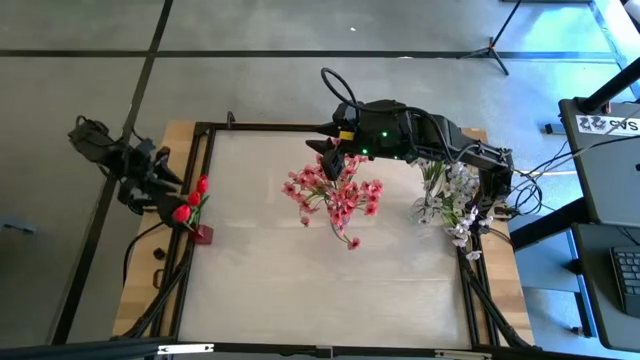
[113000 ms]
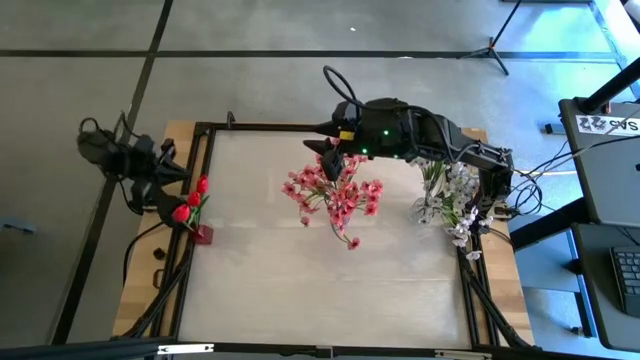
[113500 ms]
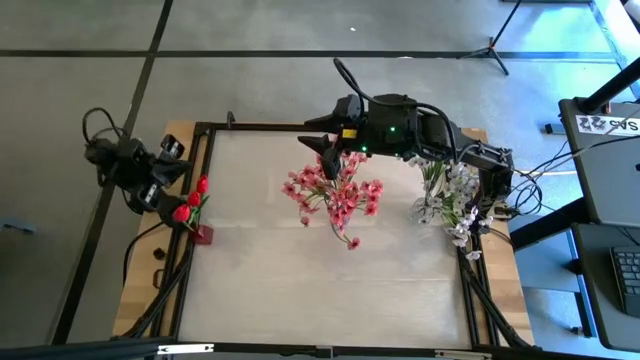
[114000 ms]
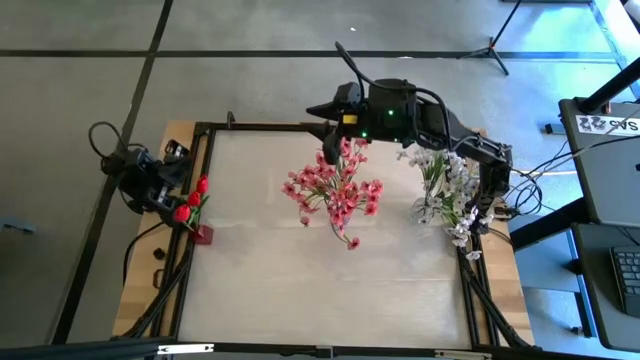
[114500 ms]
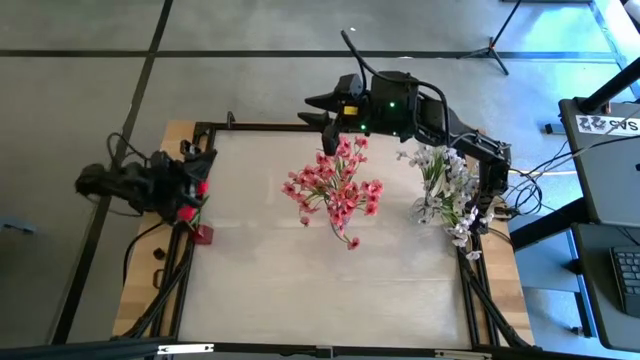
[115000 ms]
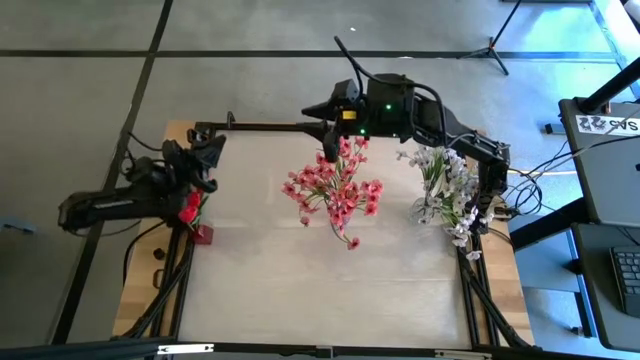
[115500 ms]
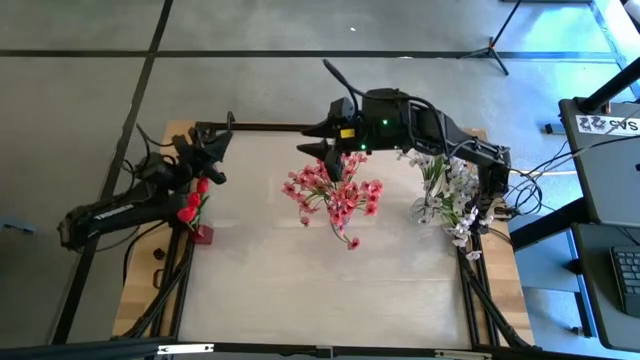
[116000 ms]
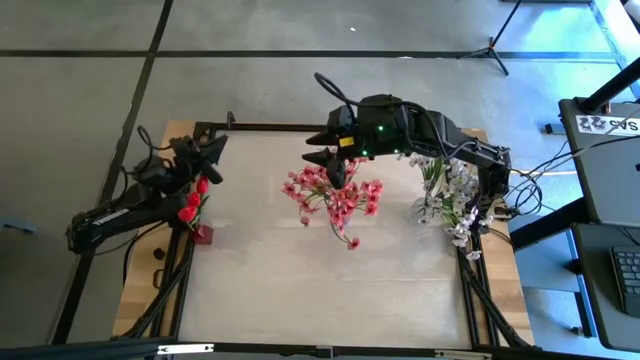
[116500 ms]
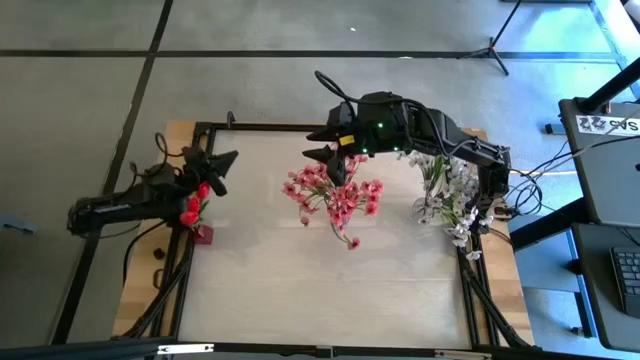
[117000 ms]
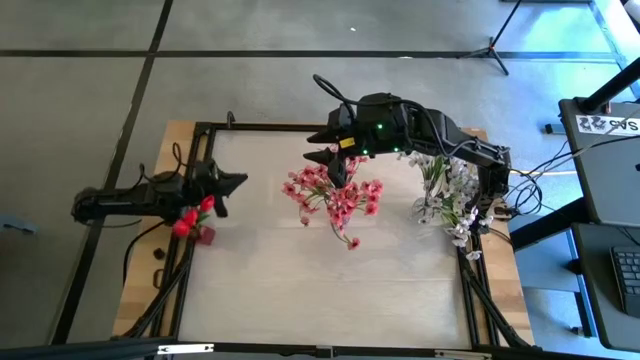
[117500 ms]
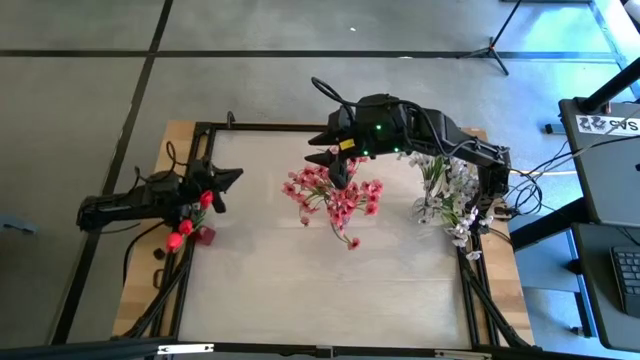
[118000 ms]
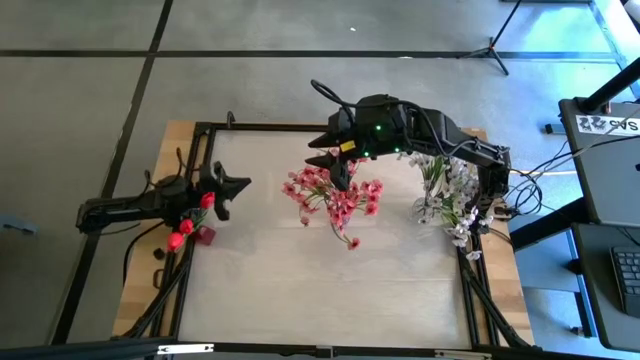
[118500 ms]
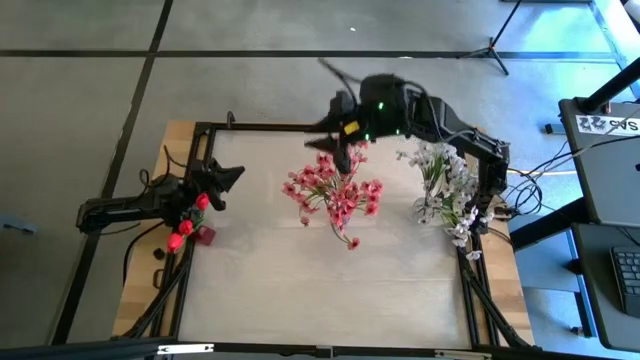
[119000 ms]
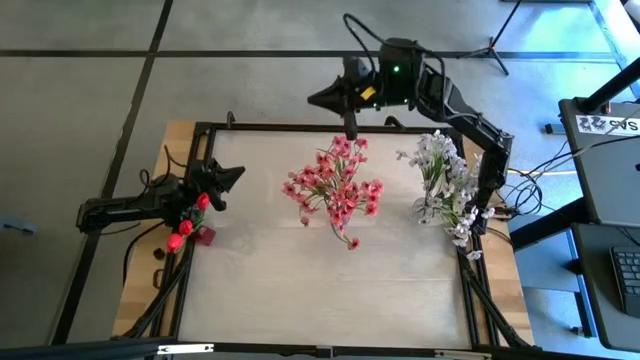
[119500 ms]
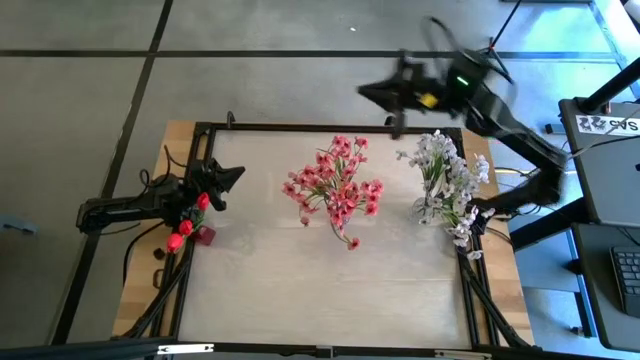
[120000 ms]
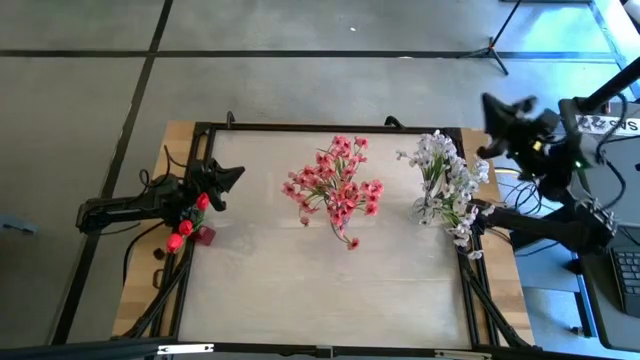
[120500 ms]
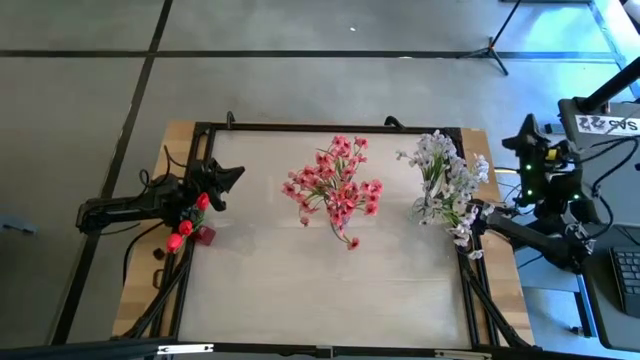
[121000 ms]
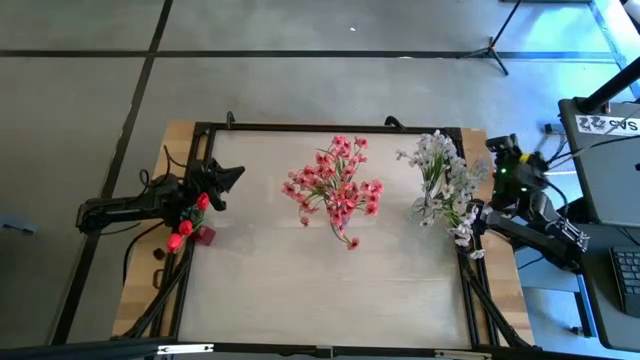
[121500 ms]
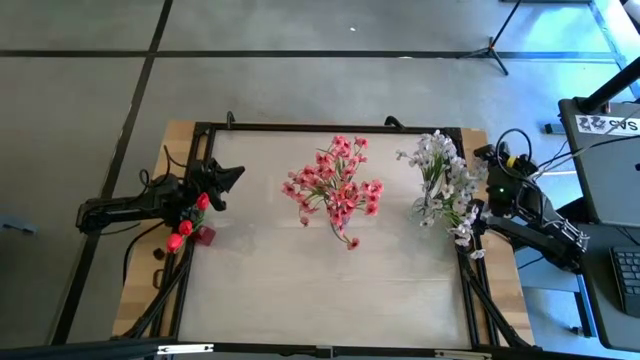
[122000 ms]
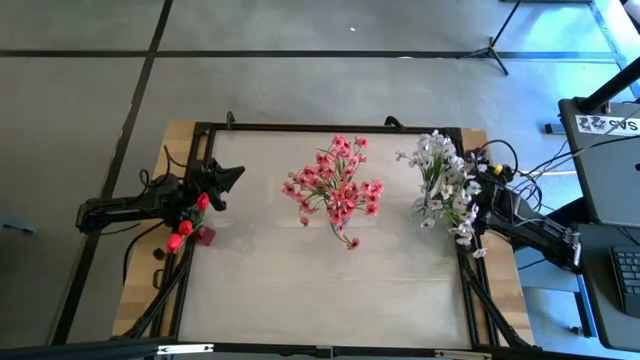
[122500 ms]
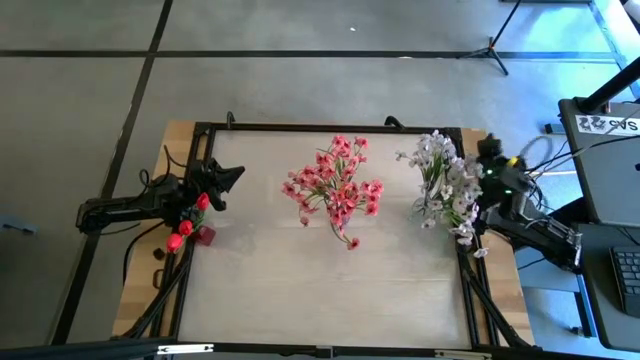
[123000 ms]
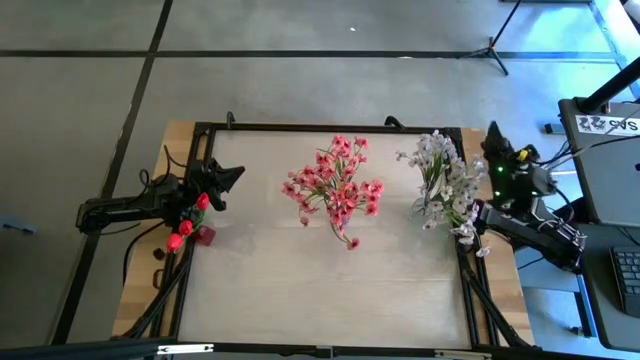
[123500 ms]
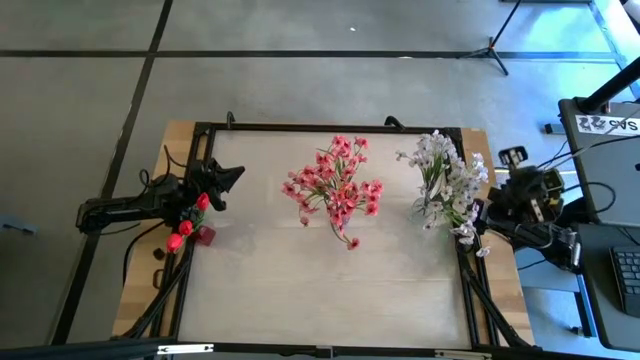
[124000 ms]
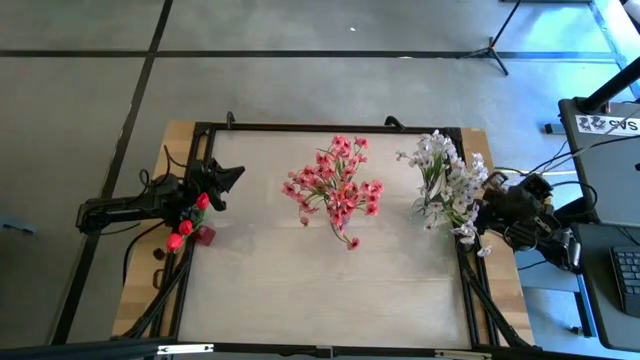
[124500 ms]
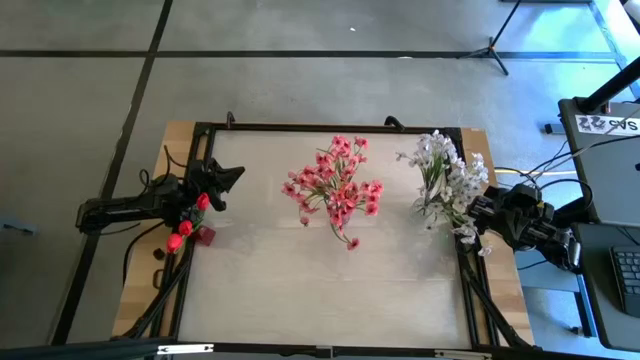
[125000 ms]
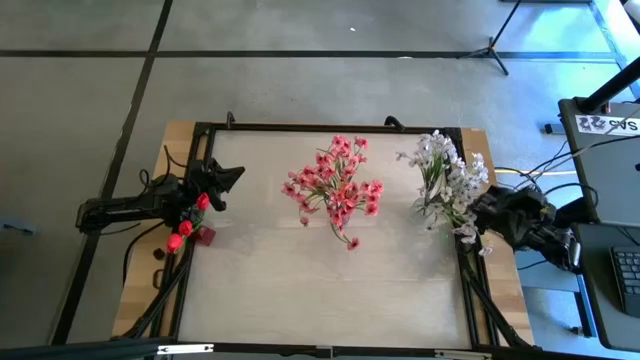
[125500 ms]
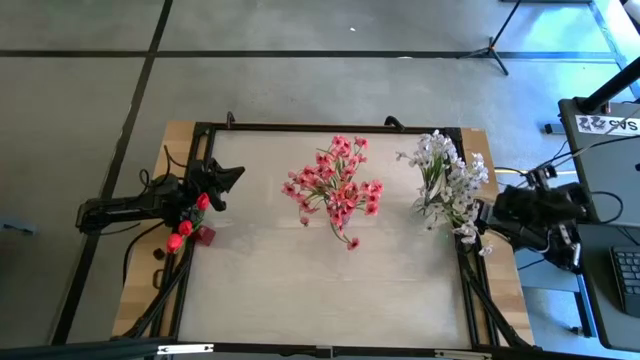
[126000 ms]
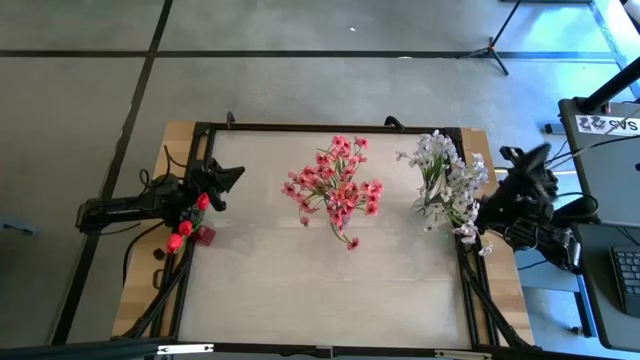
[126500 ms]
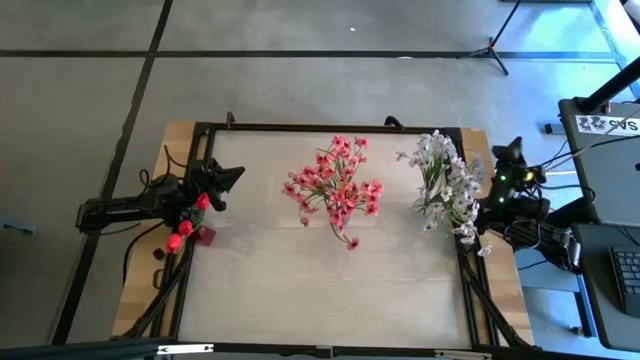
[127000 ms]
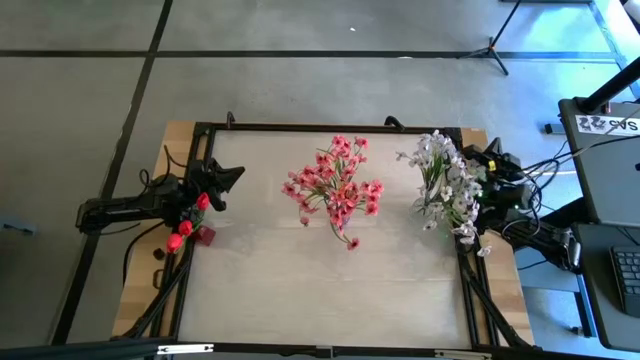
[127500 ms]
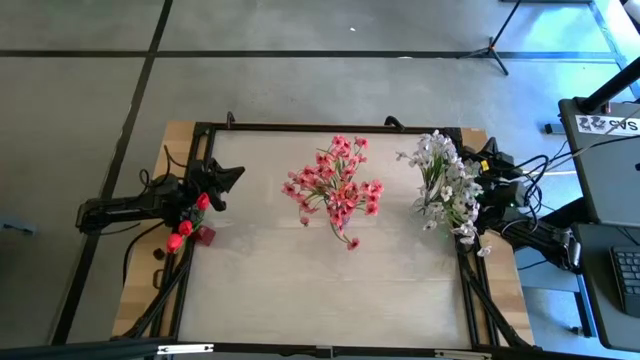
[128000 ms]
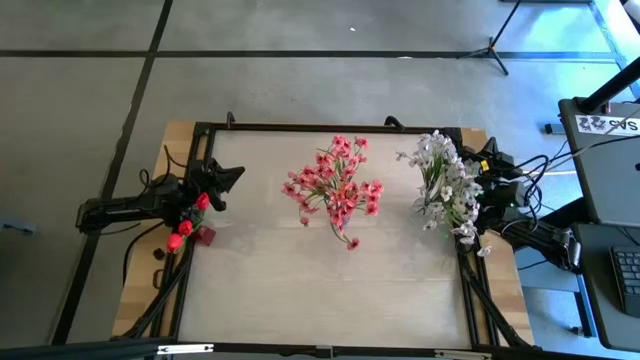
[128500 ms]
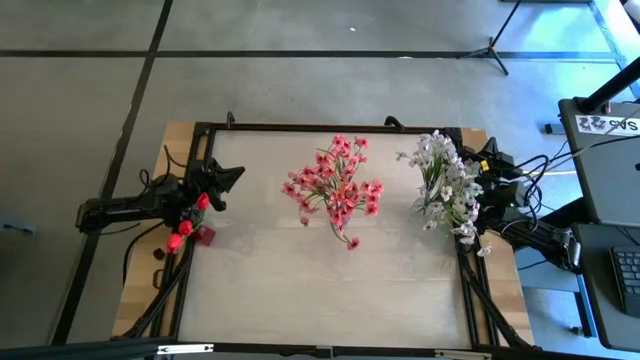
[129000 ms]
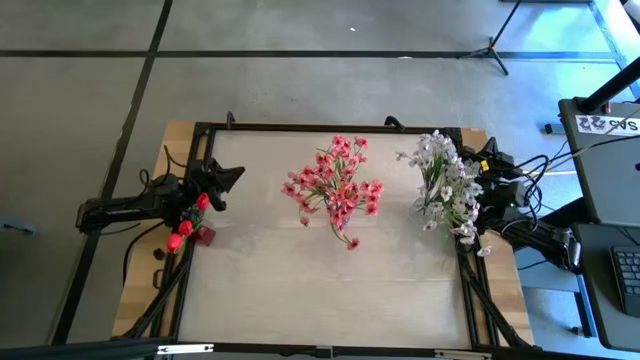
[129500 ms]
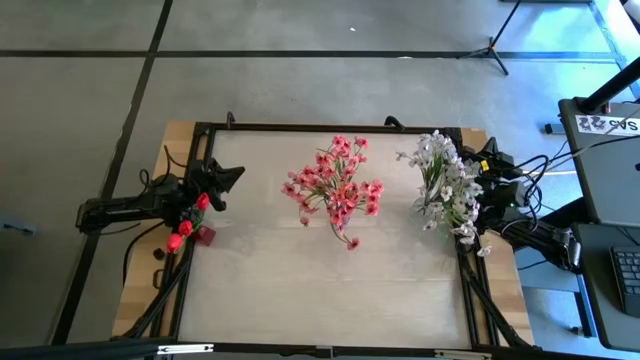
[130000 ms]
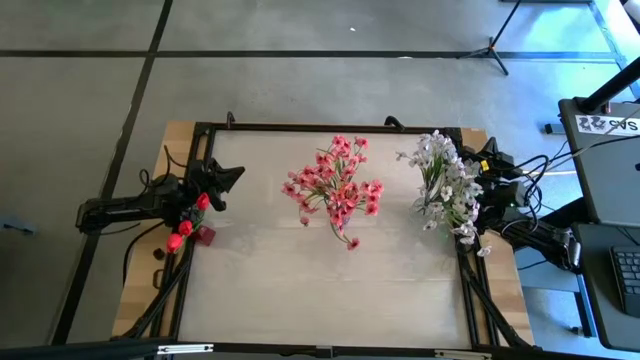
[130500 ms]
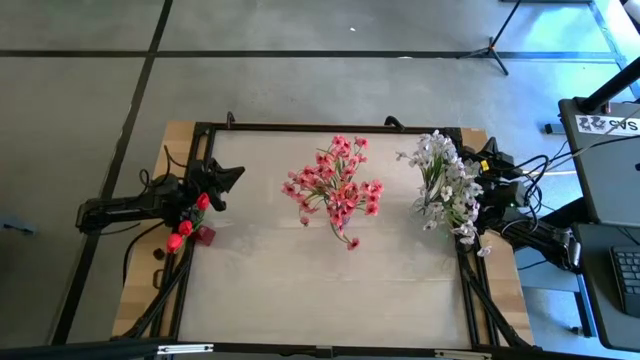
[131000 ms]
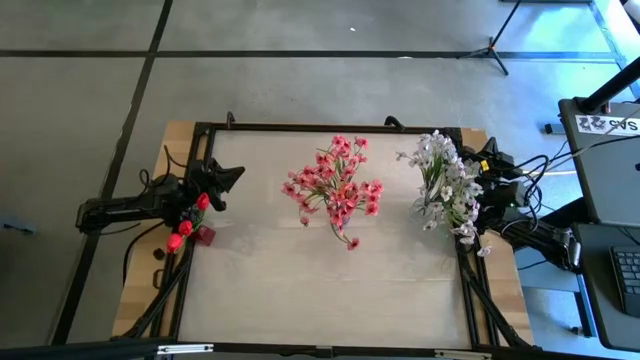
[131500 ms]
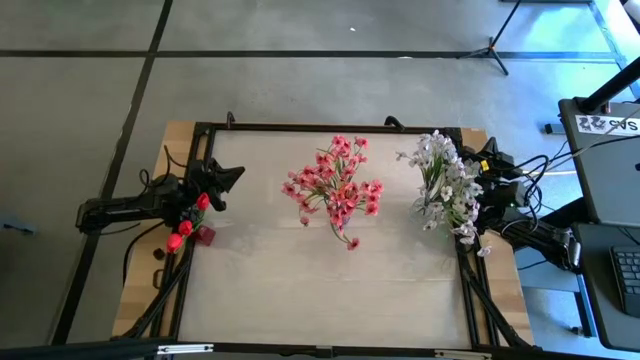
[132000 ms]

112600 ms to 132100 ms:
Task: Sort flowers into vase by color
Return to Home Position

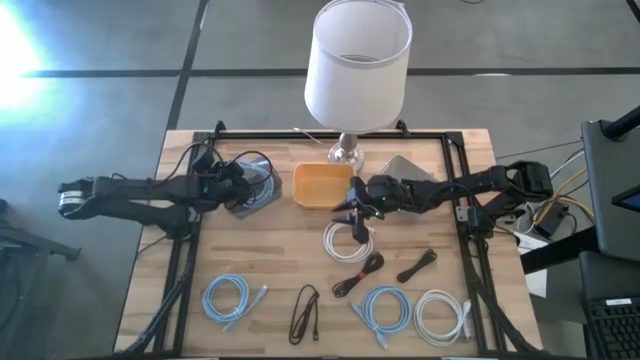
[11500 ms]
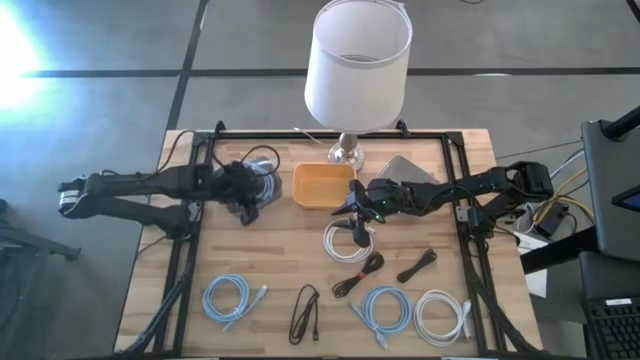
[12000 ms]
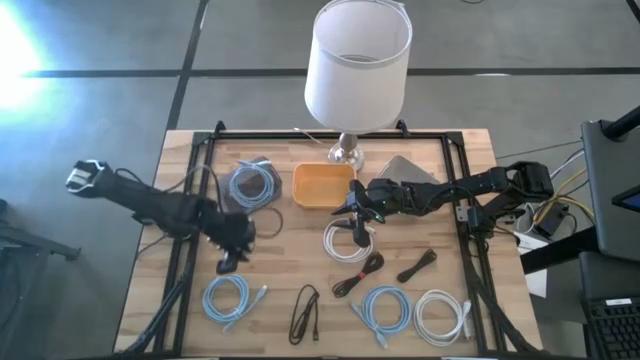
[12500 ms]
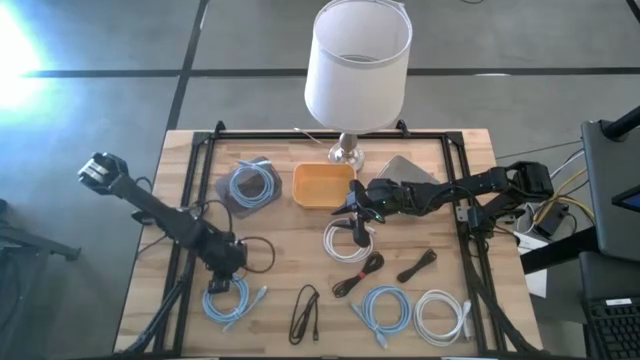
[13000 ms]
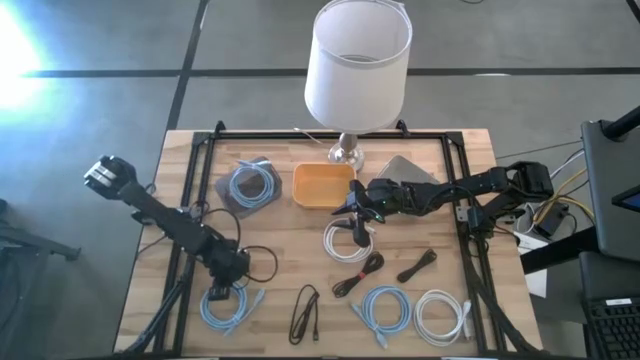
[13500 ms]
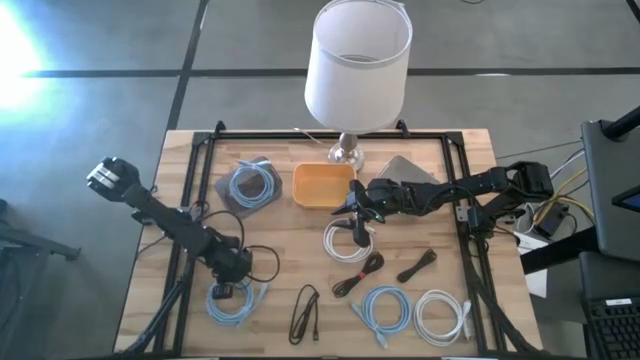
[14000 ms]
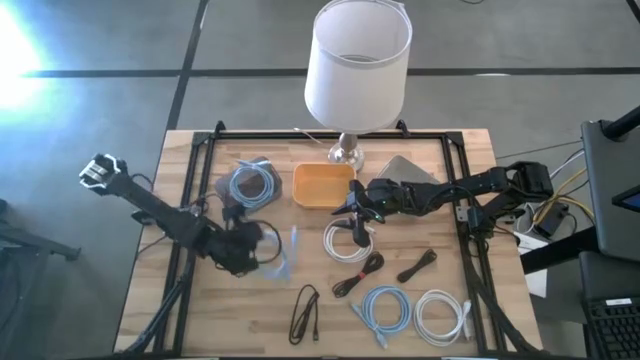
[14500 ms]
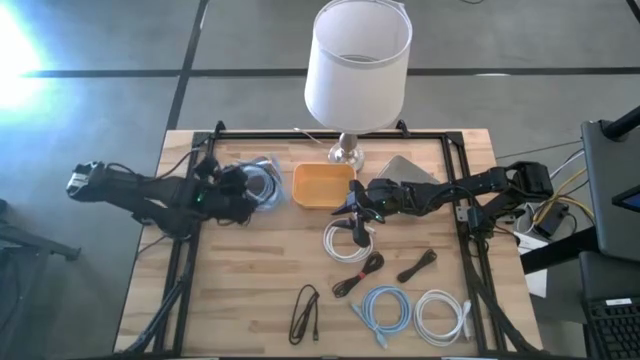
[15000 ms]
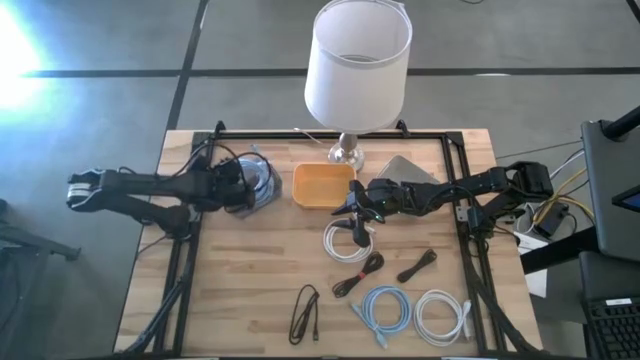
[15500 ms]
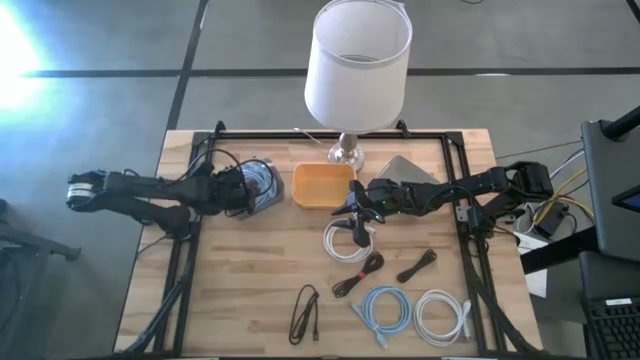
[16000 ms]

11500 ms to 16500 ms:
Task: Sort HDMI cables
Put the left blue HDMI cable into the black bin
